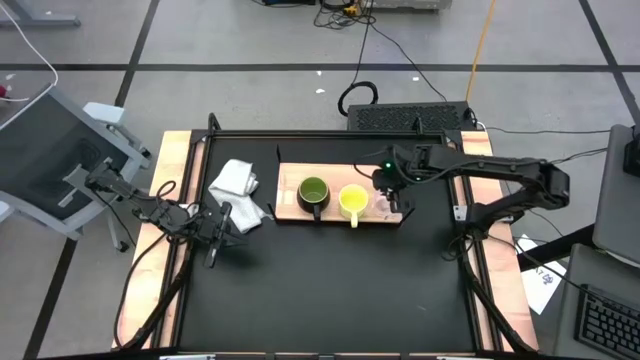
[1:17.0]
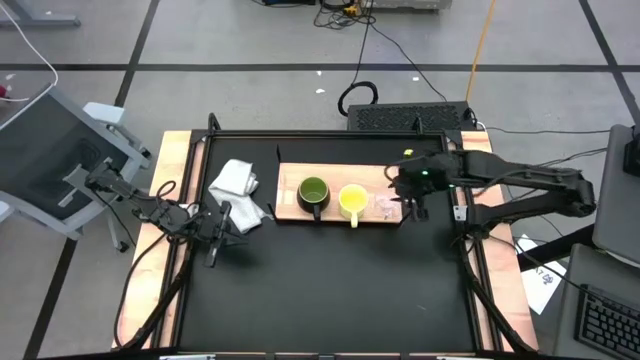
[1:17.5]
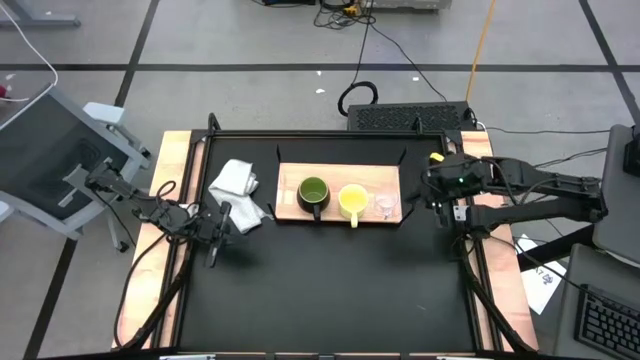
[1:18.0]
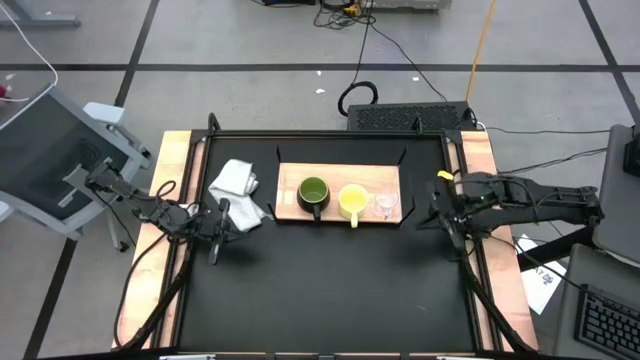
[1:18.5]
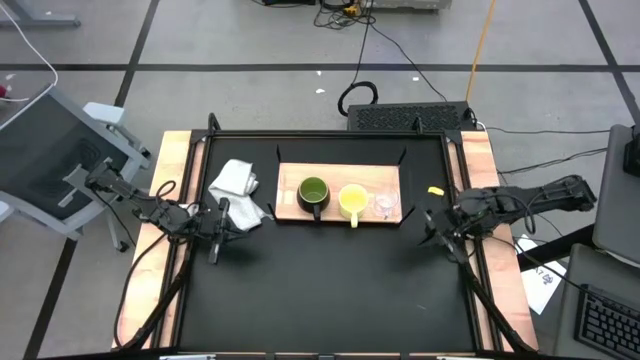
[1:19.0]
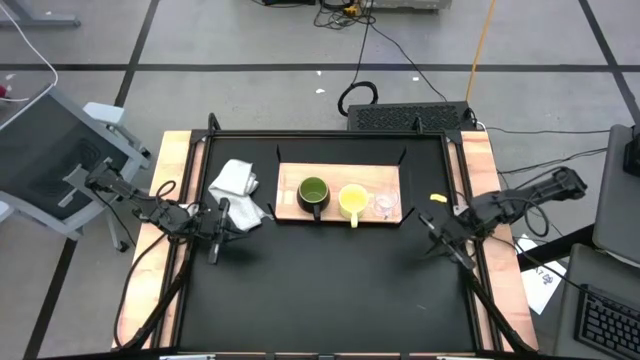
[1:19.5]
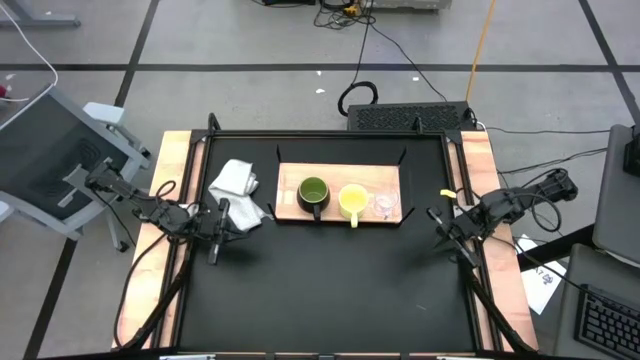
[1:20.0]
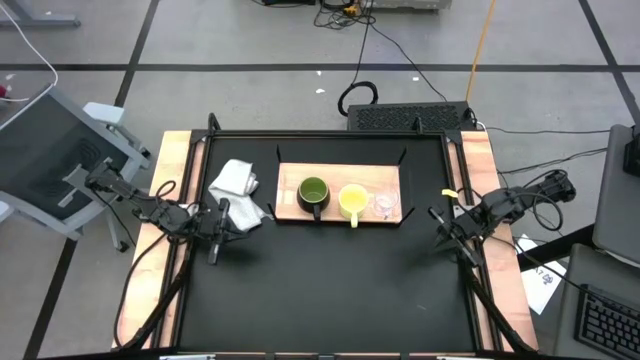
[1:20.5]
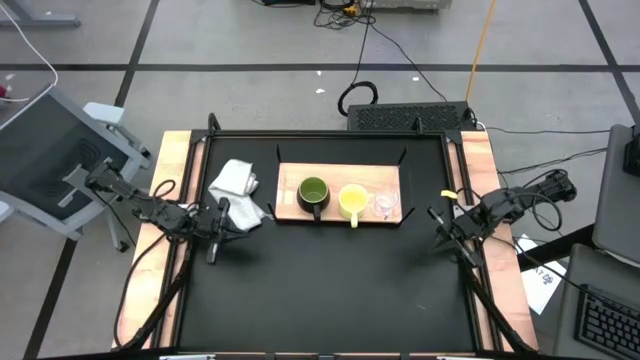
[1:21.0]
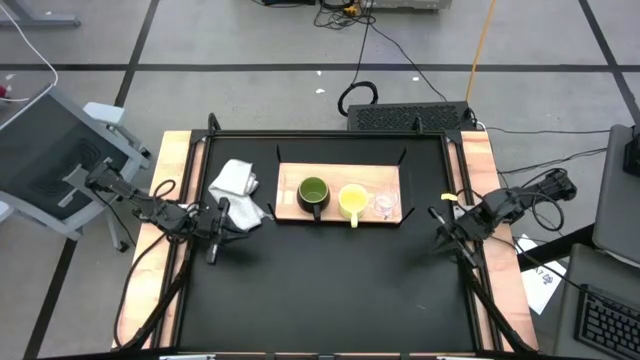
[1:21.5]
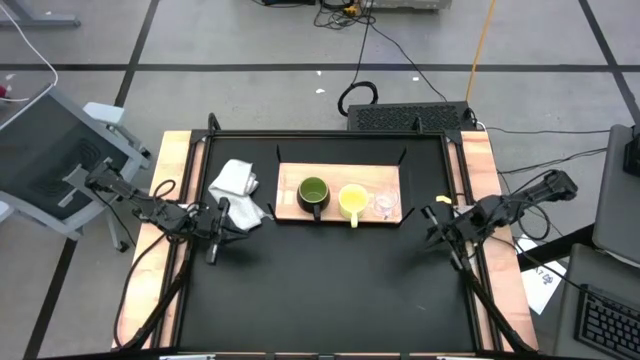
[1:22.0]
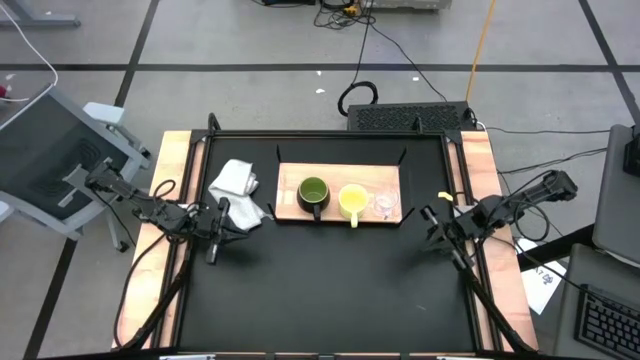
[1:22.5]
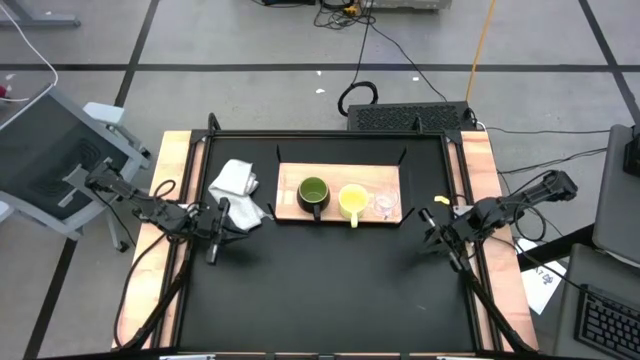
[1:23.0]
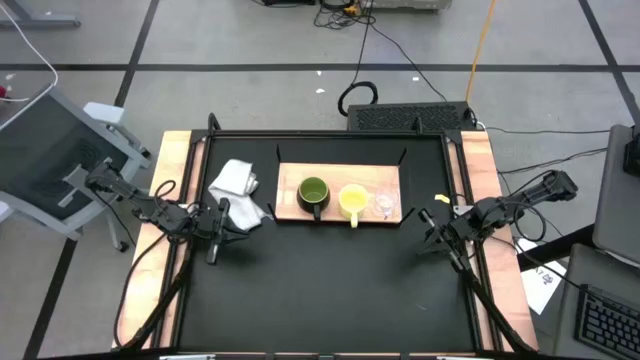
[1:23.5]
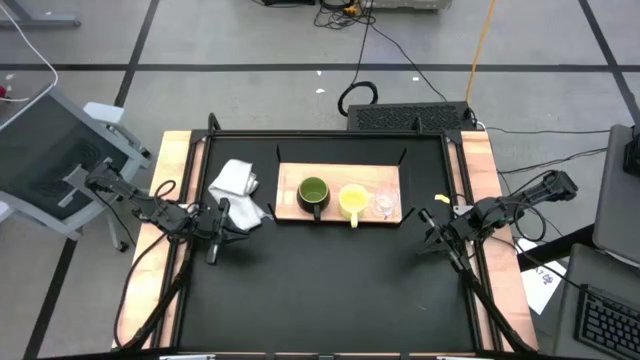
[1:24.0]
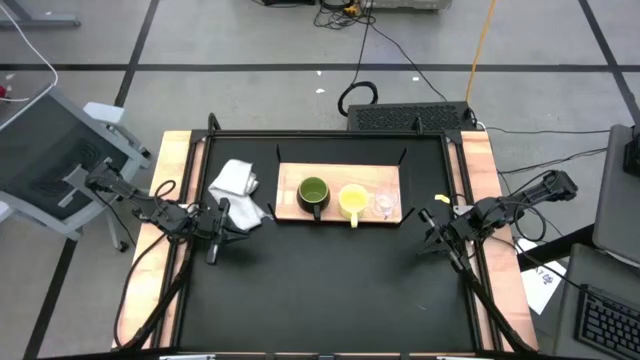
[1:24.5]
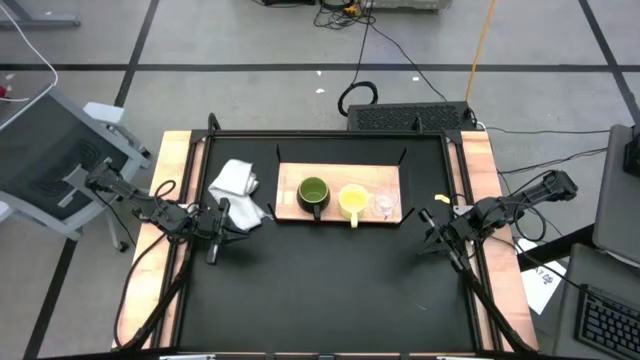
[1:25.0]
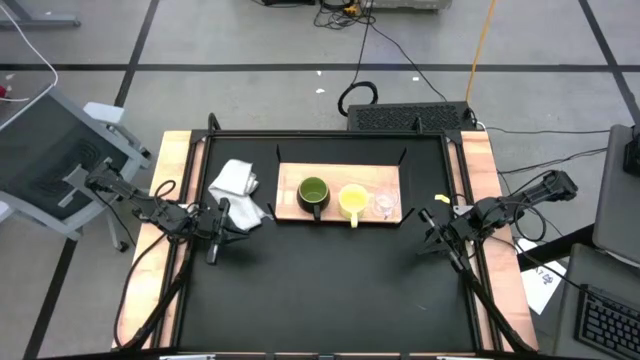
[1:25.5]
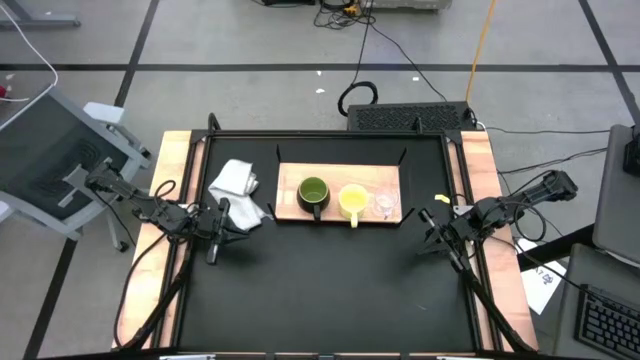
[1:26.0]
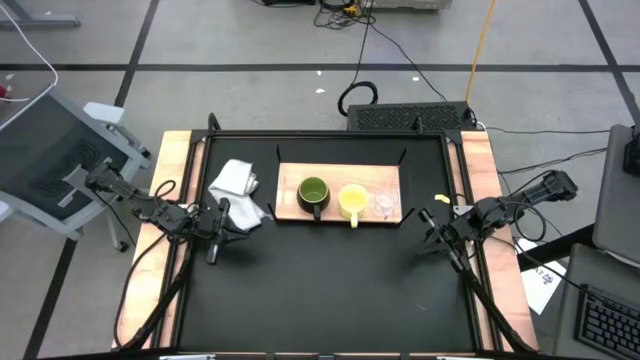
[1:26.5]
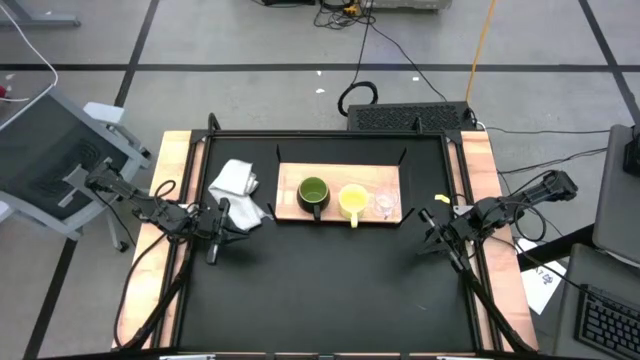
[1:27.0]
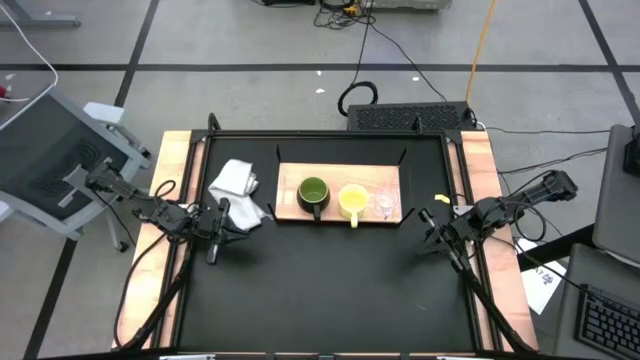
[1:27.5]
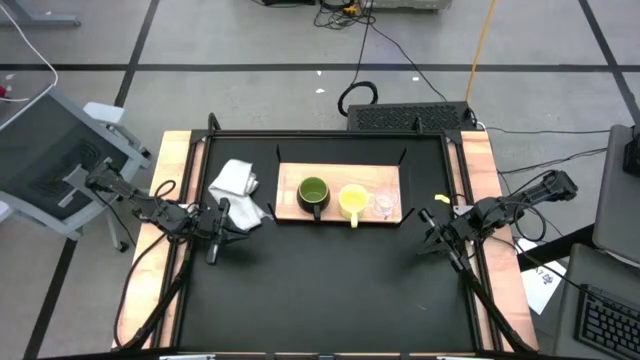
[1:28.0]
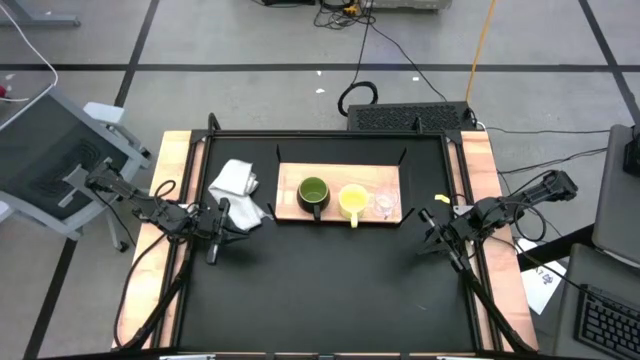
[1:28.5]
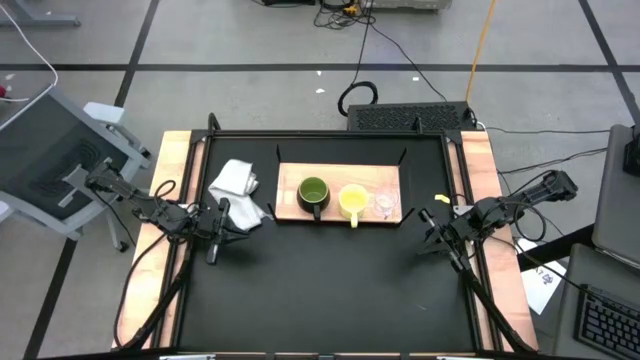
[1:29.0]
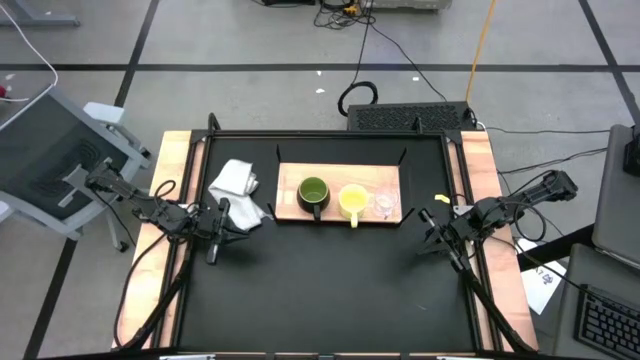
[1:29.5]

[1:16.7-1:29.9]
Task: Stack small to large cups/mugs on shelf
Return to Home Position

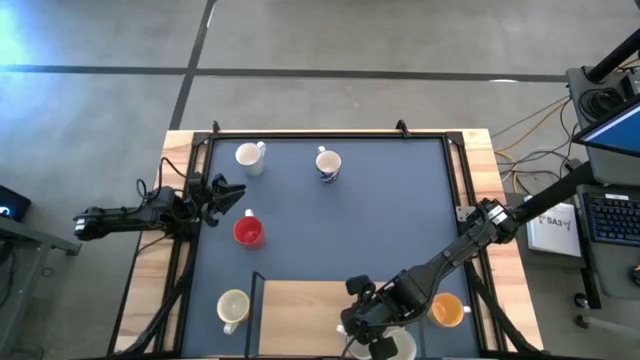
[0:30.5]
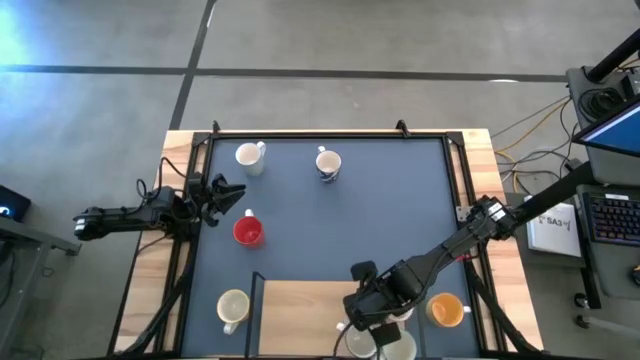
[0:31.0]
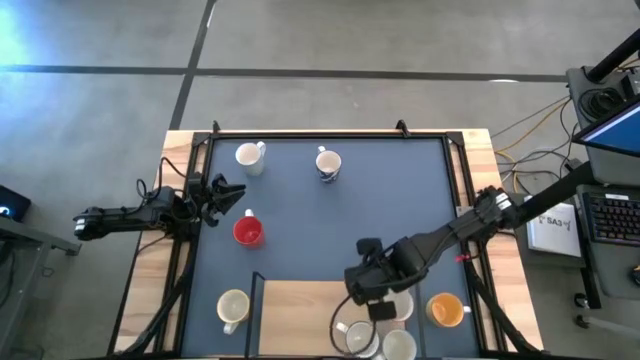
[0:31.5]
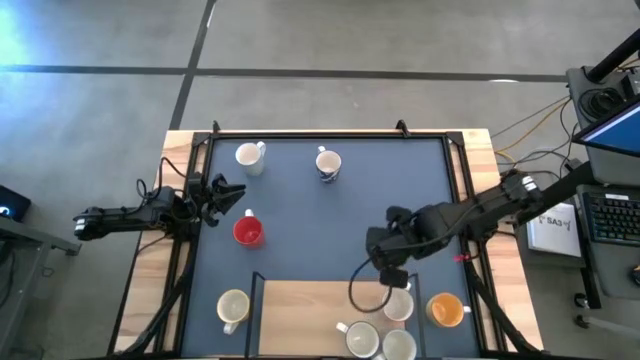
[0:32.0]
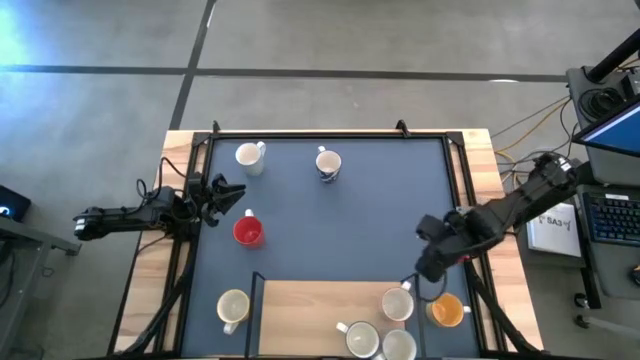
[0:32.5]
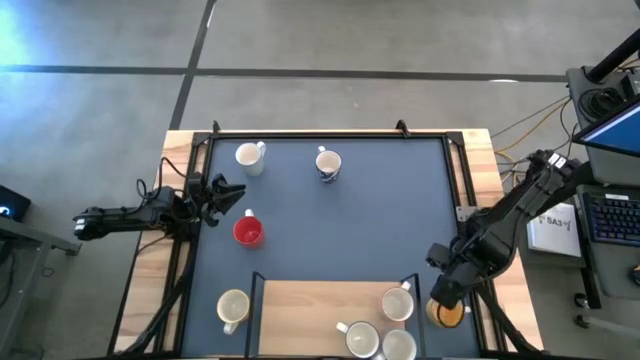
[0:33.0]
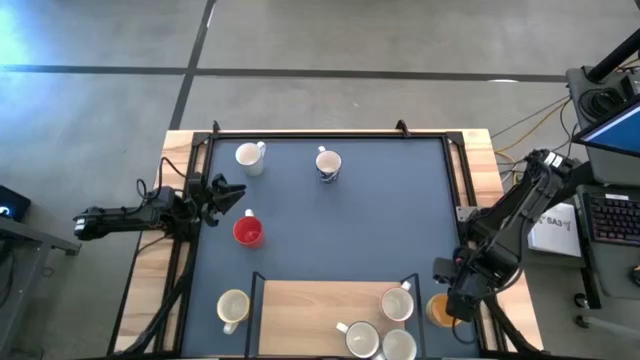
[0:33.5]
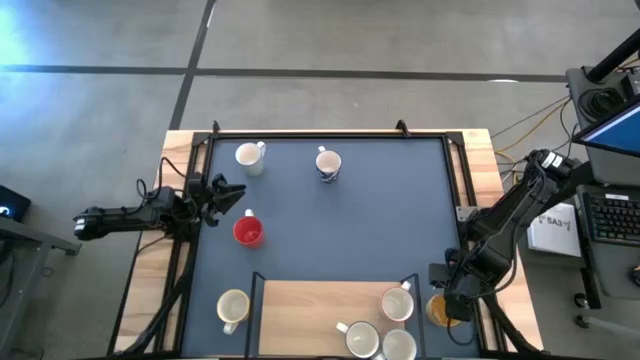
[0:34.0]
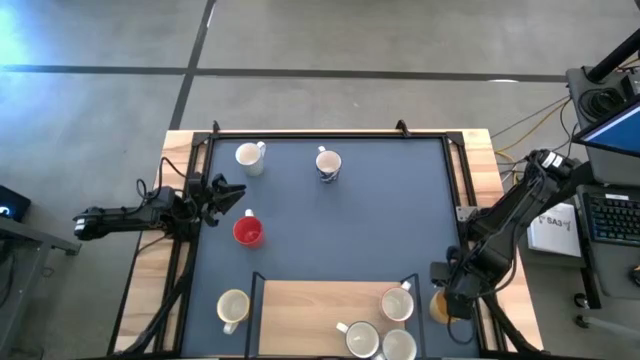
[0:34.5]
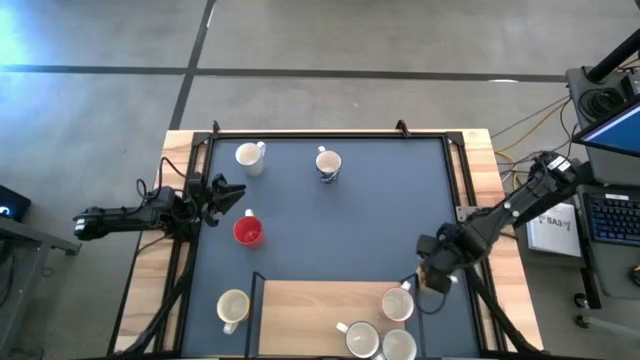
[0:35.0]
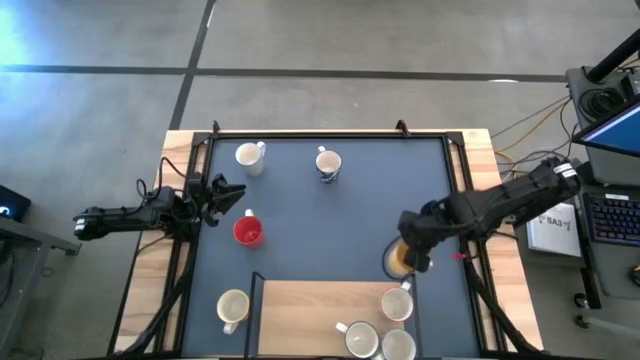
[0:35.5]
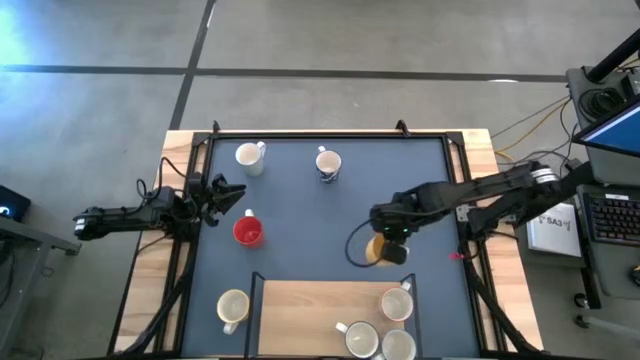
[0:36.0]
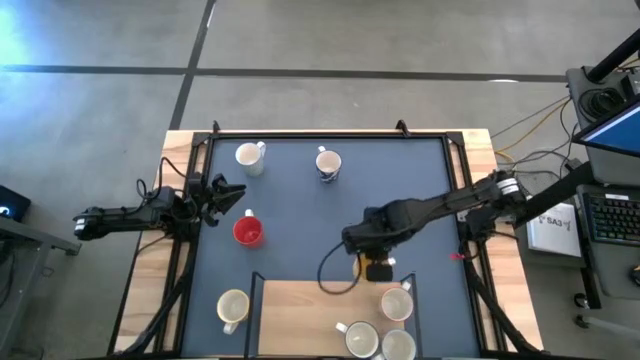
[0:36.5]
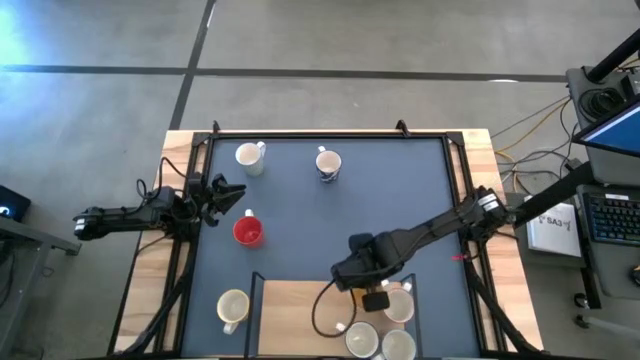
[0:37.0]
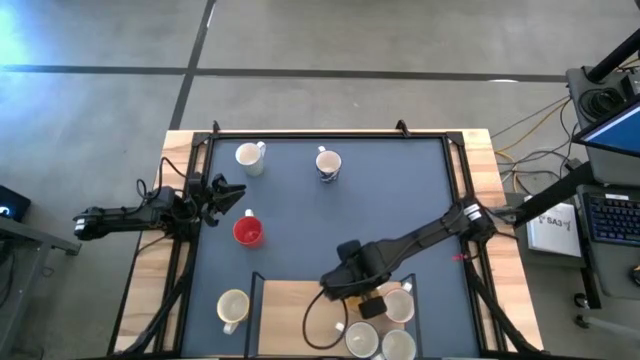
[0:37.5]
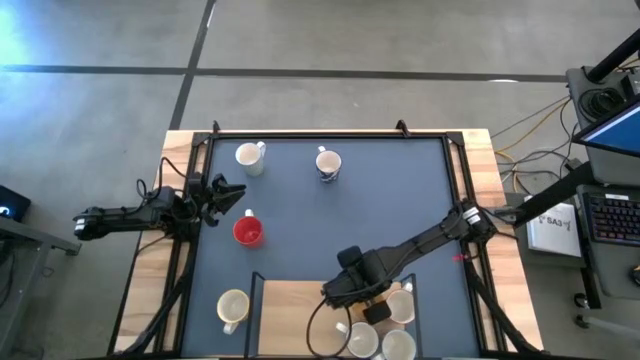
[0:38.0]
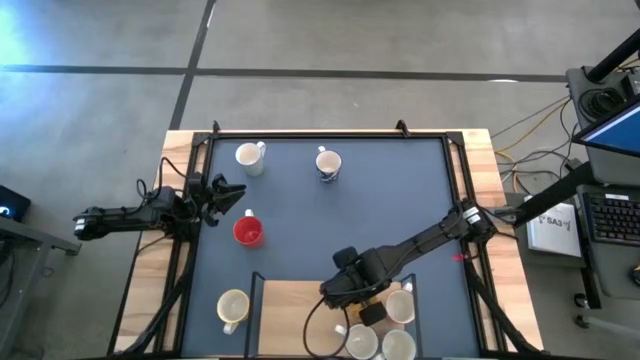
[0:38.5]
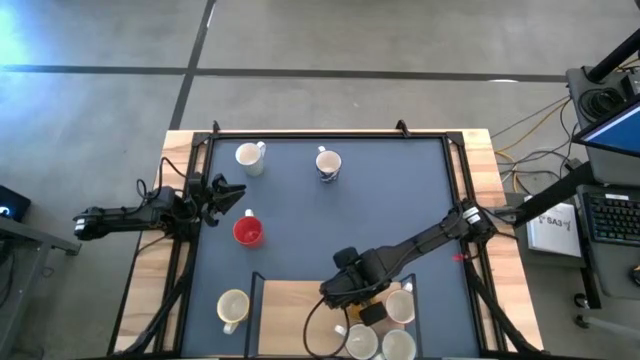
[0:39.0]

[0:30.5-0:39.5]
Task: Place coffee mugs
Put the yellow mug on the shelf
